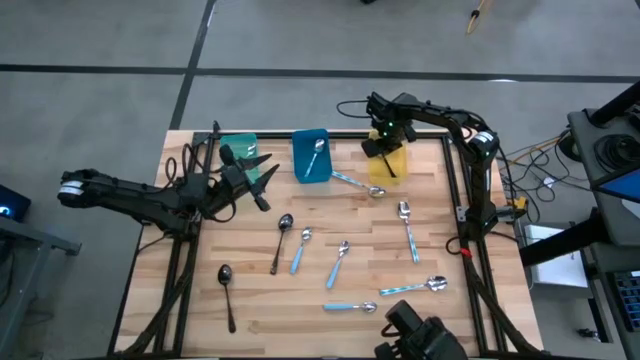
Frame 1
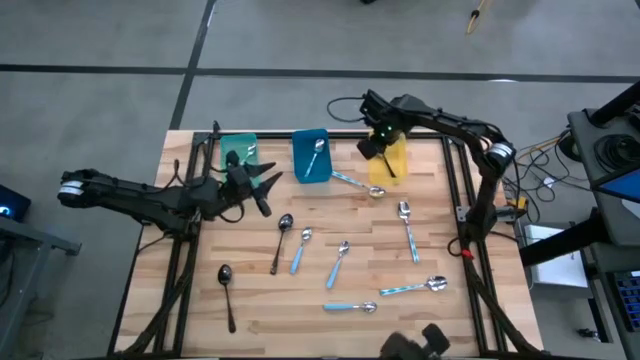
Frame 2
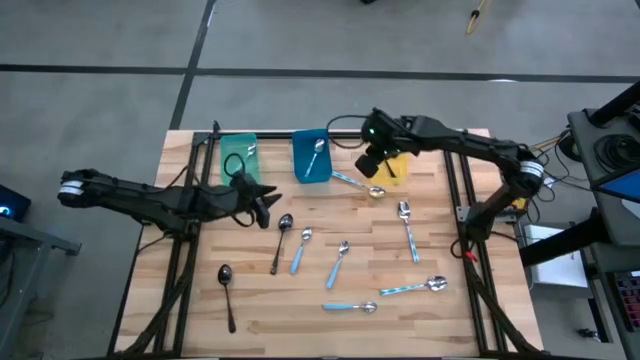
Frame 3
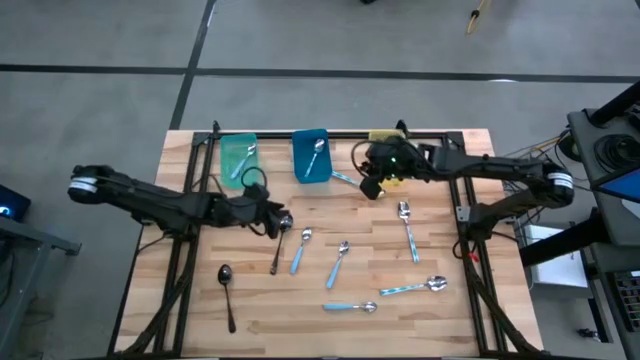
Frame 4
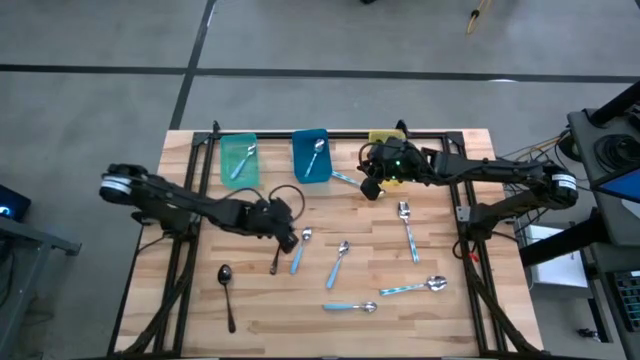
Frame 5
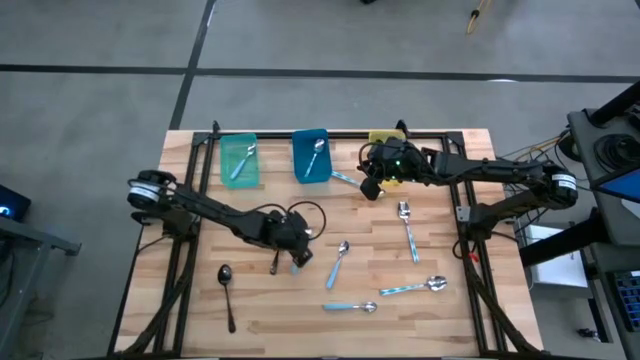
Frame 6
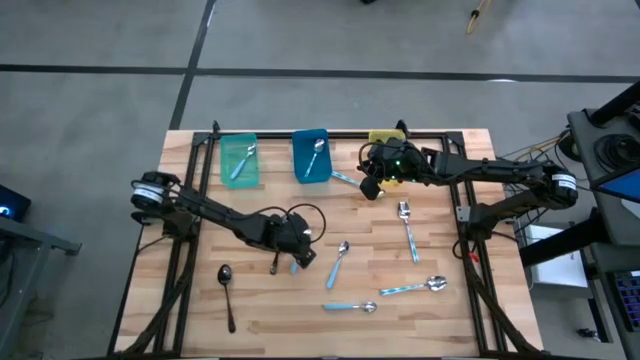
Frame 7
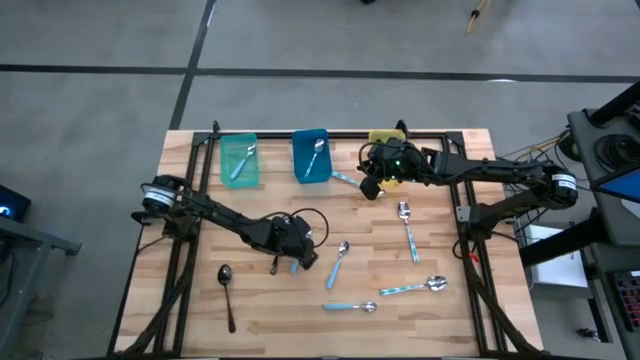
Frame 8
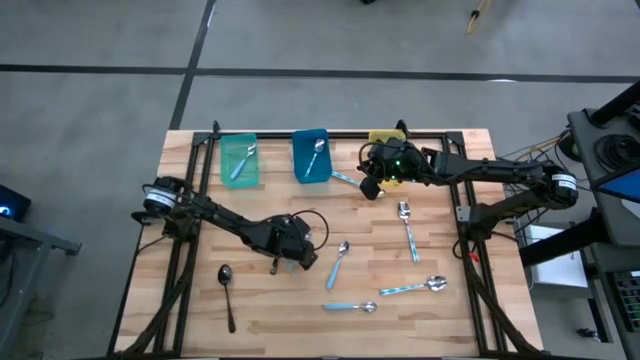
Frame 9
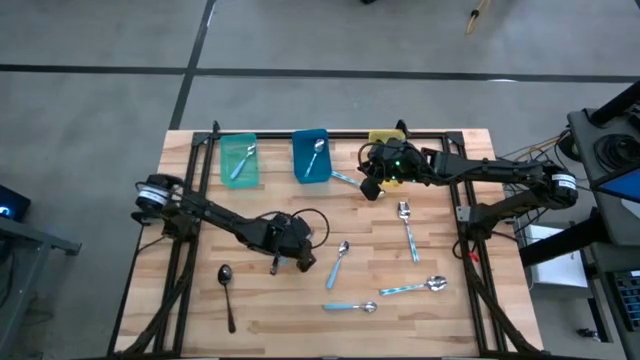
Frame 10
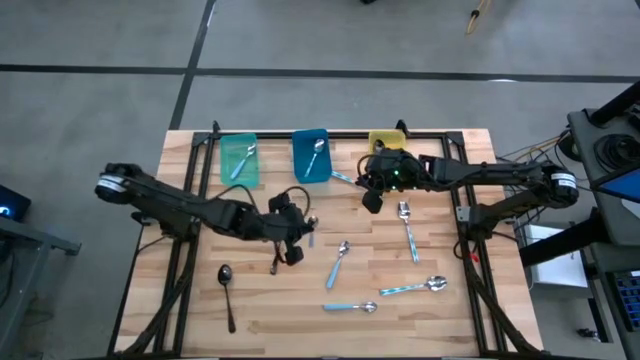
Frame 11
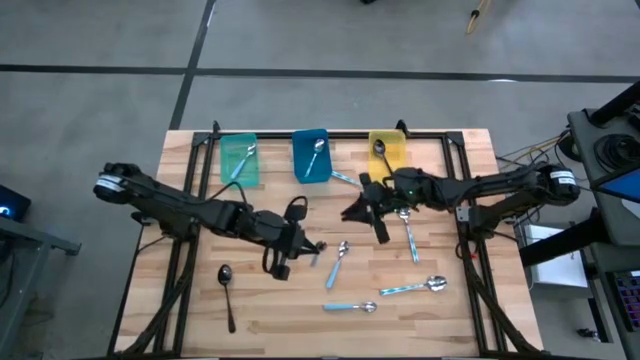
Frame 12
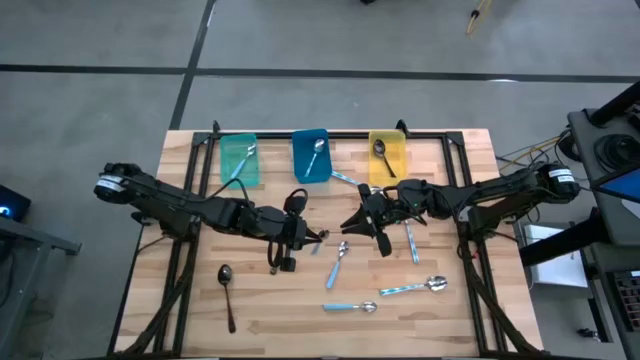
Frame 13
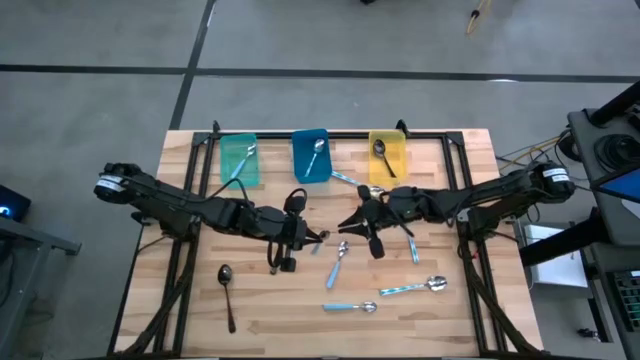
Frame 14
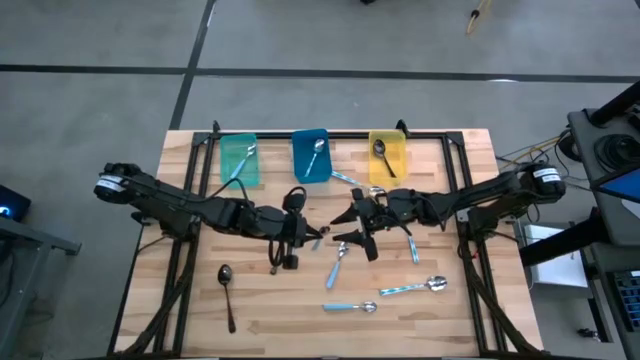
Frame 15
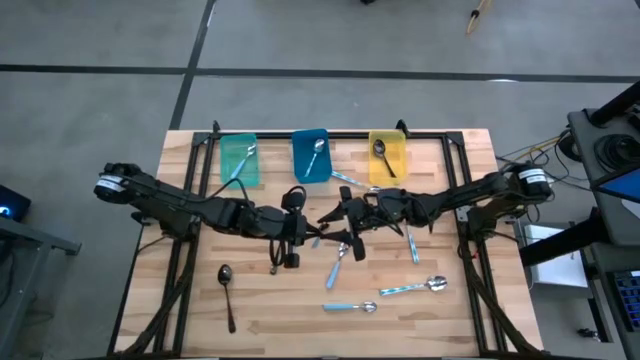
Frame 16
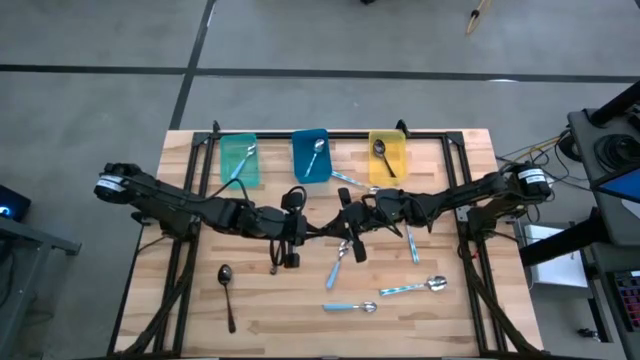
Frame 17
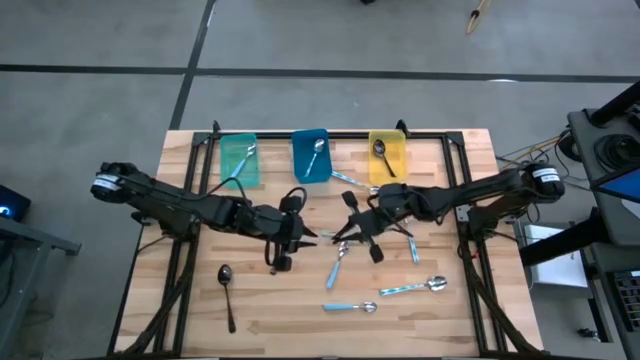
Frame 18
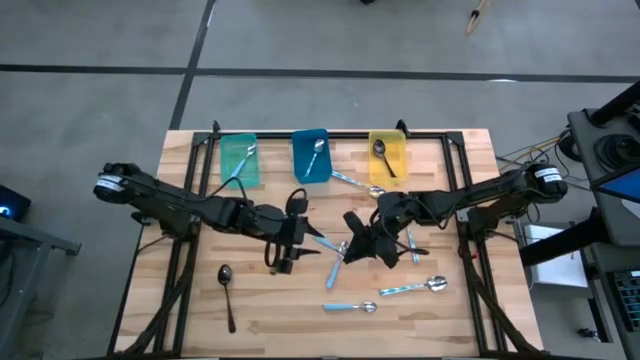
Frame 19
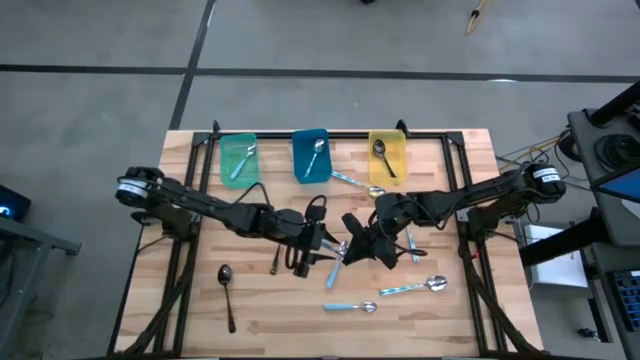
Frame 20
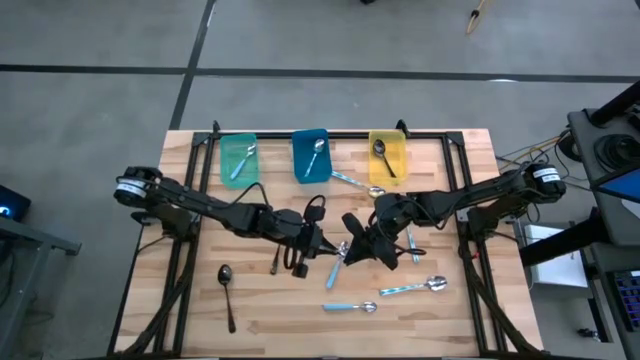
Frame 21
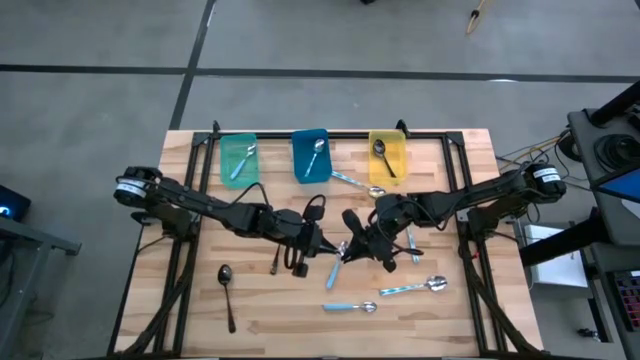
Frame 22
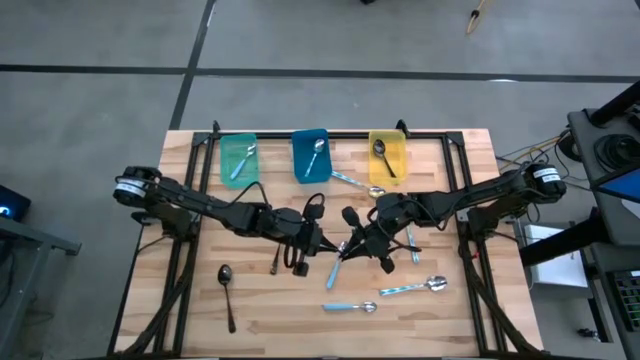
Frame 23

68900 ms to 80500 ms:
Task: Sort silverware by color (type)
Put the blue spoon into the green bin

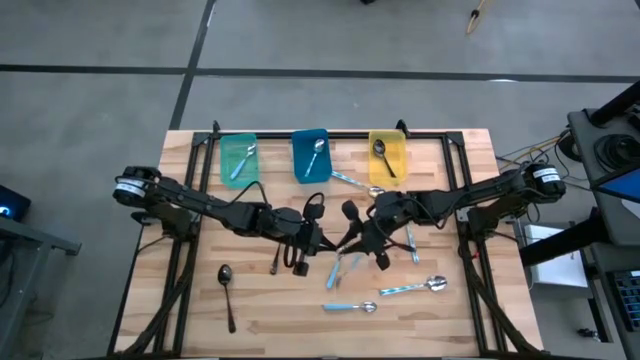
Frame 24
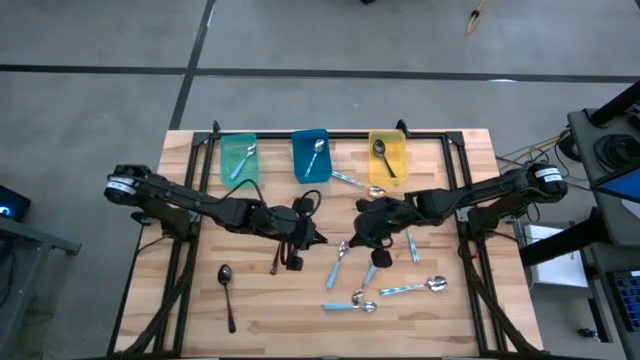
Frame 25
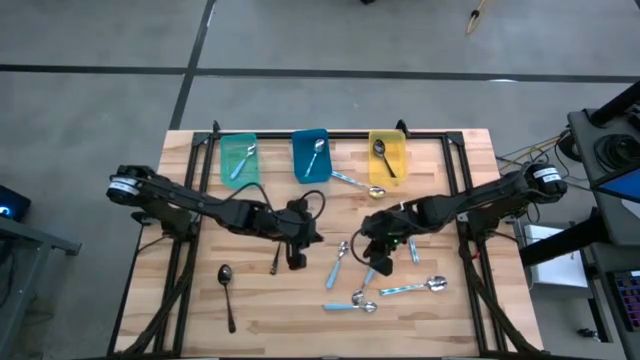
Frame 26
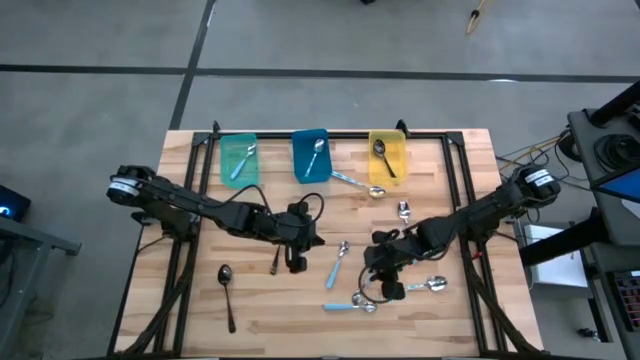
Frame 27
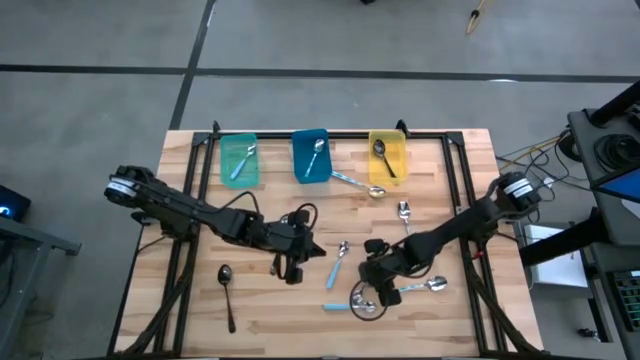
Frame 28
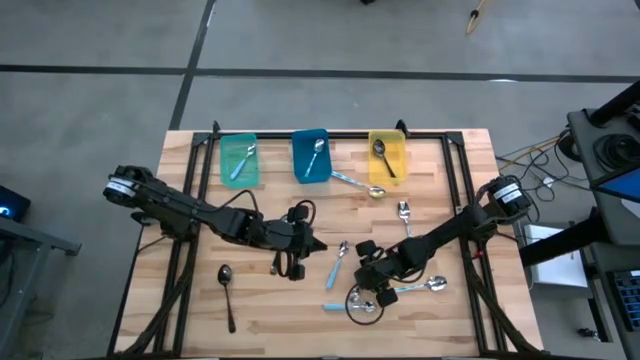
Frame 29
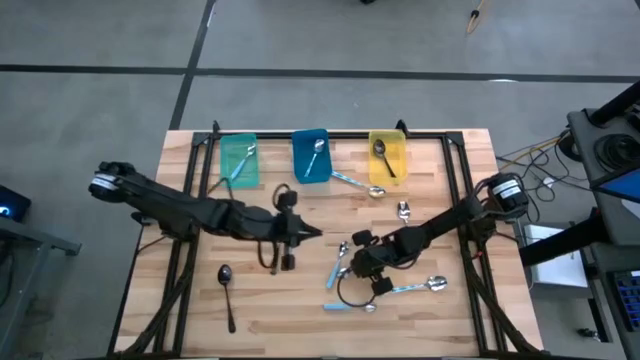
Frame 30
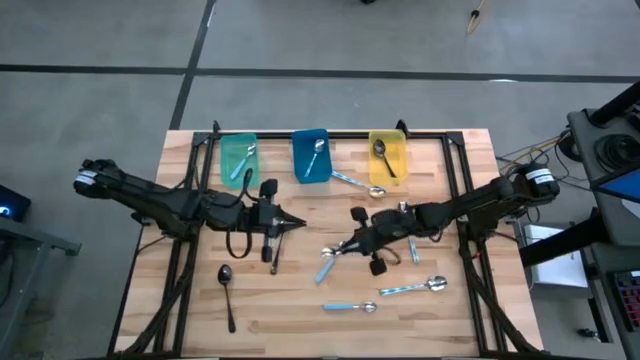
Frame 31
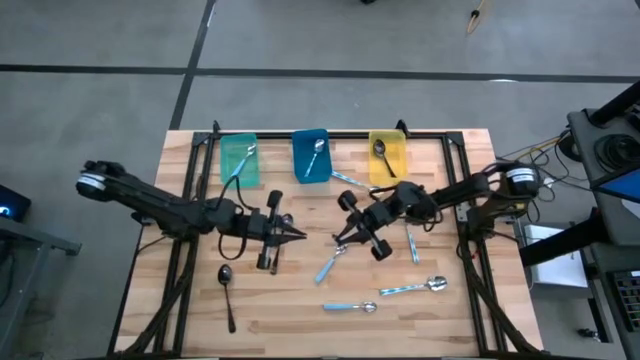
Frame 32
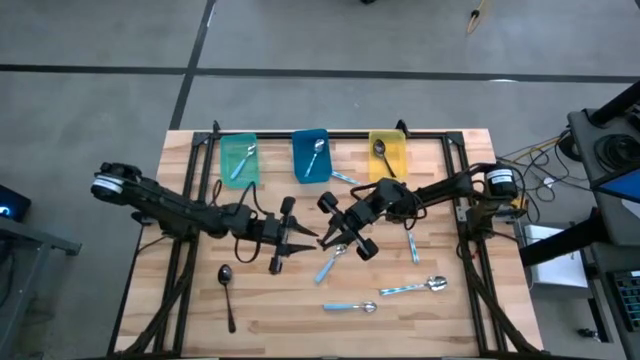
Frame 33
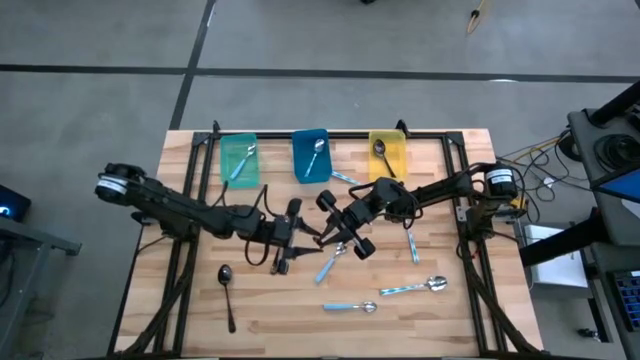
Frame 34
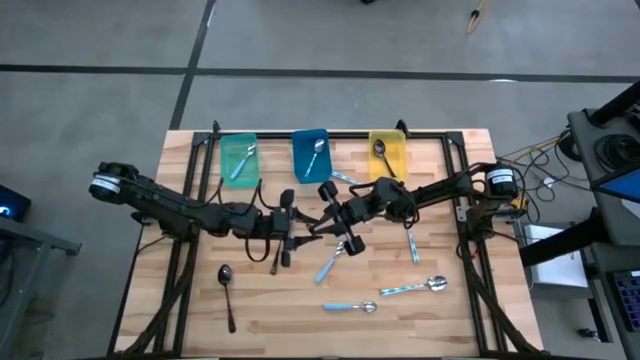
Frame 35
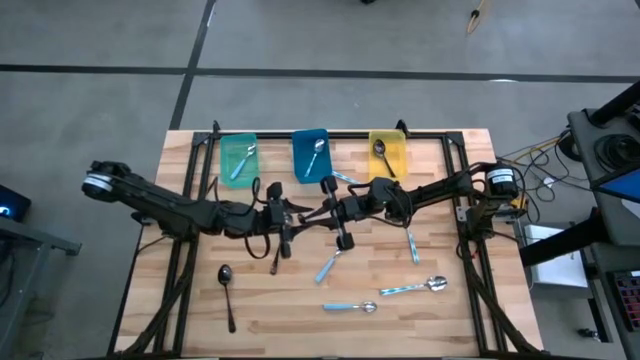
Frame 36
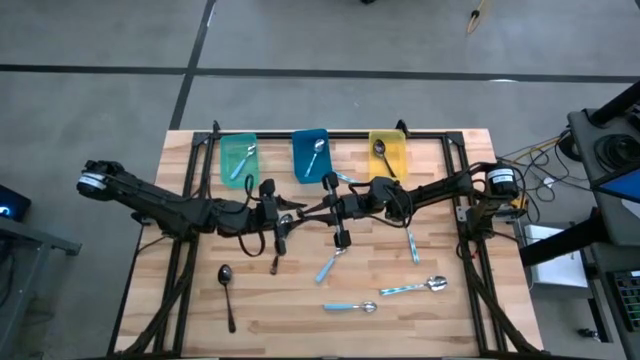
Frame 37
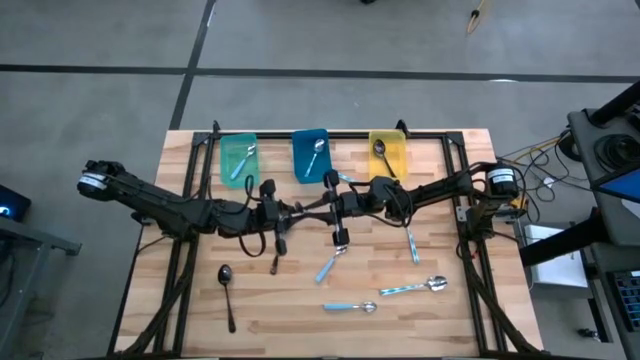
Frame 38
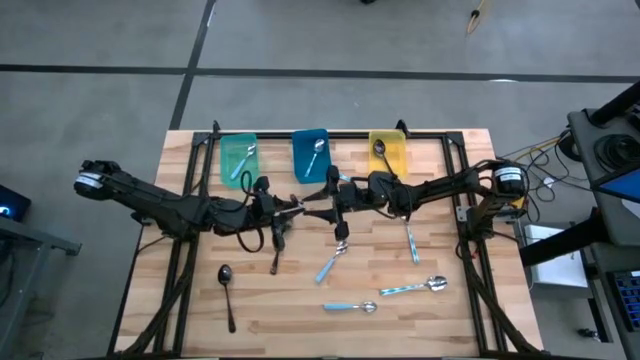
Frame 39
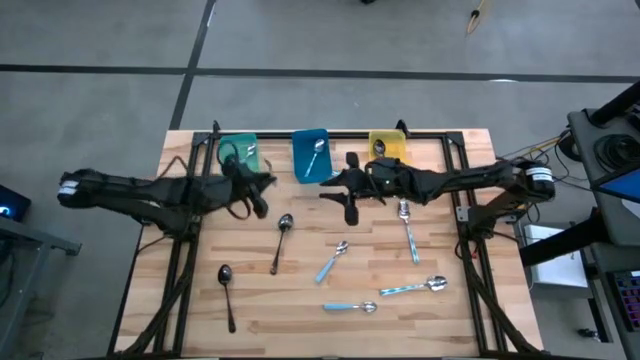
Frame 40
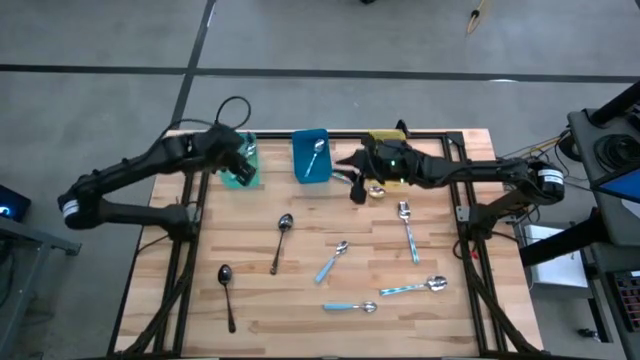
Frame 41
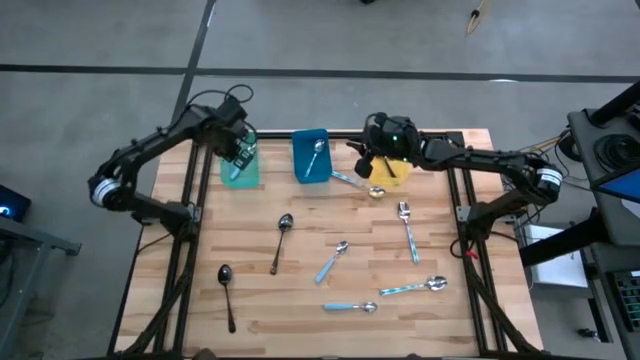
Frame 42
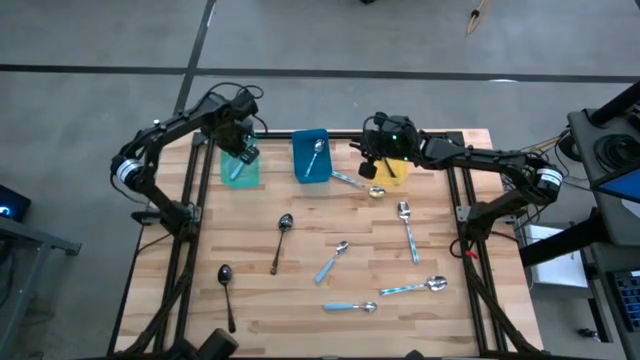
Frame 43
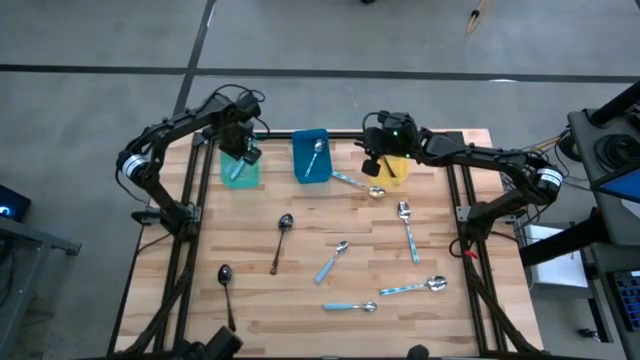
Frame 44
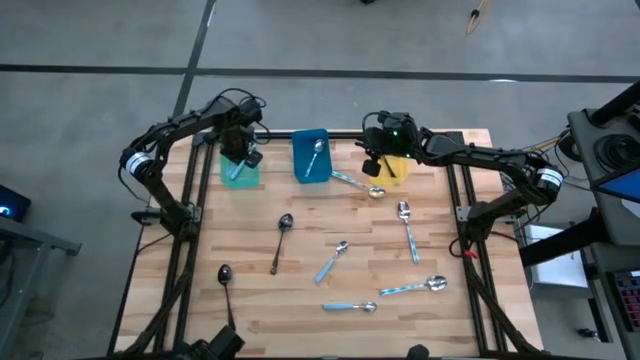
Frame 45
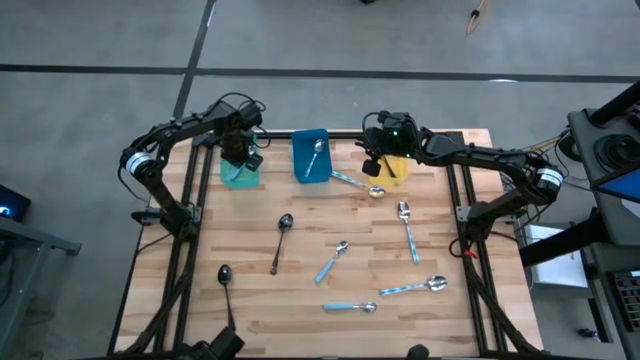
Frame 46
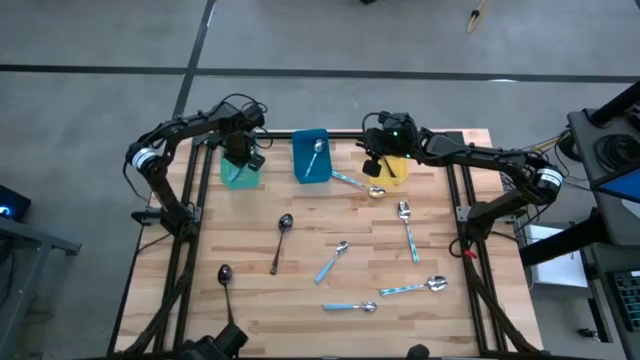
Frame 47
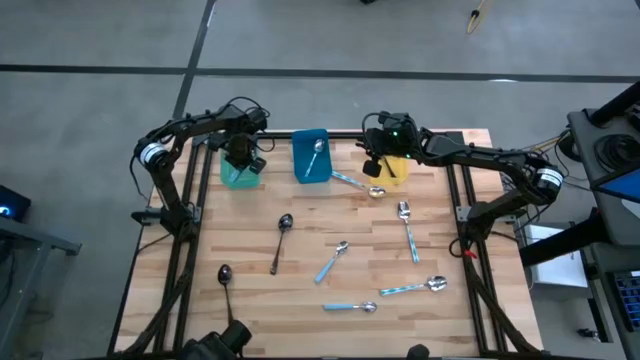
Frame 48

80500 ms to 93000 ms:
Put the blue spoon into the green bin
